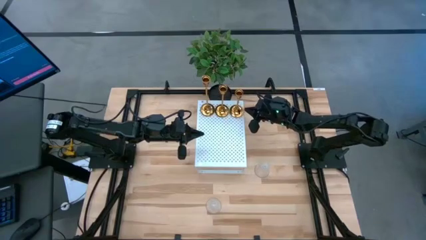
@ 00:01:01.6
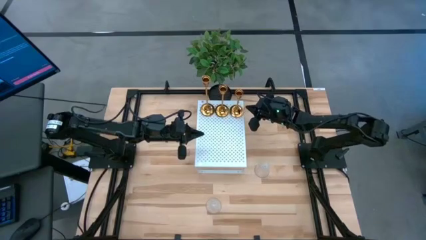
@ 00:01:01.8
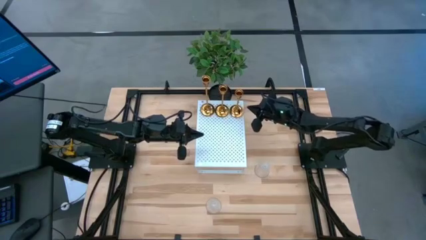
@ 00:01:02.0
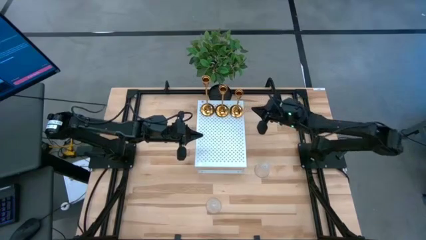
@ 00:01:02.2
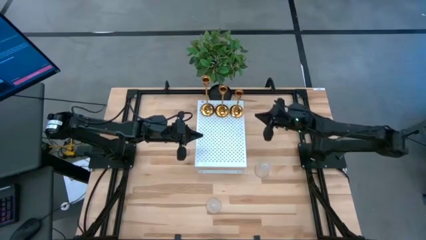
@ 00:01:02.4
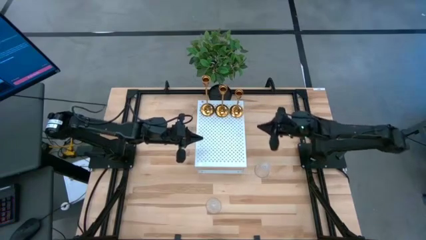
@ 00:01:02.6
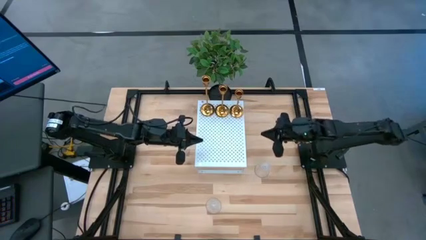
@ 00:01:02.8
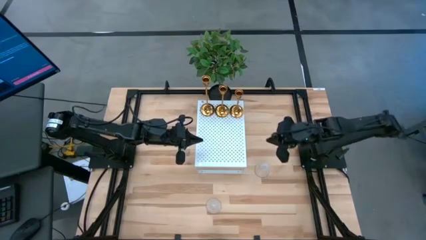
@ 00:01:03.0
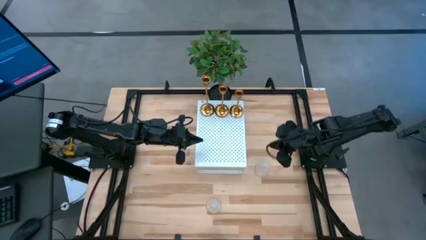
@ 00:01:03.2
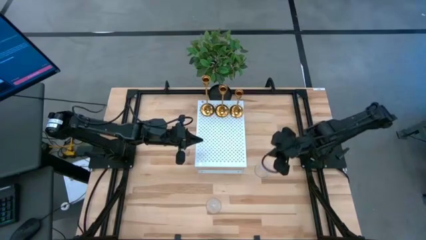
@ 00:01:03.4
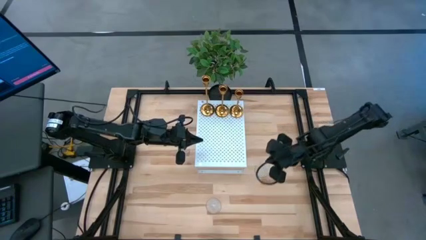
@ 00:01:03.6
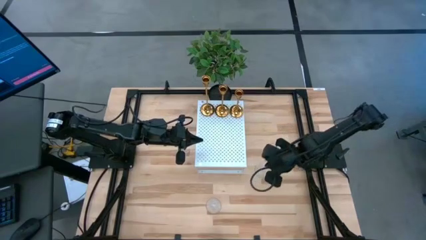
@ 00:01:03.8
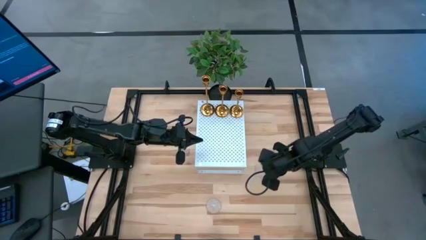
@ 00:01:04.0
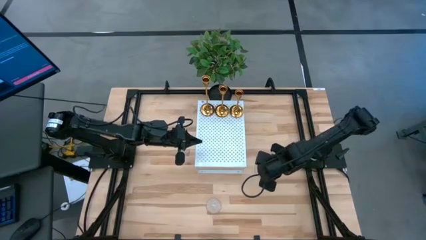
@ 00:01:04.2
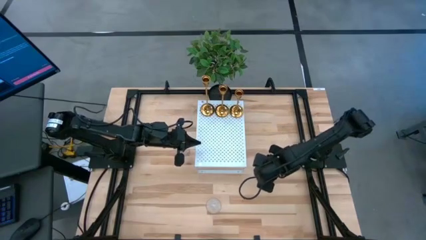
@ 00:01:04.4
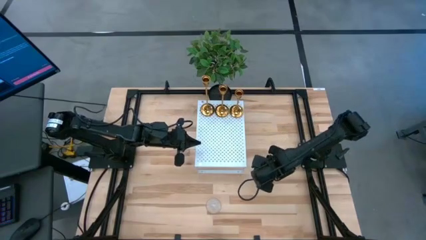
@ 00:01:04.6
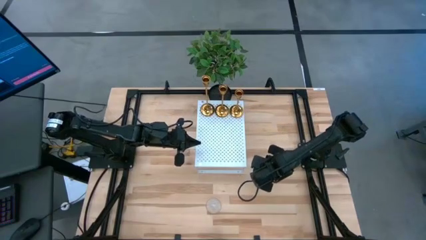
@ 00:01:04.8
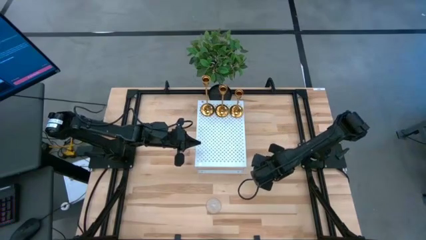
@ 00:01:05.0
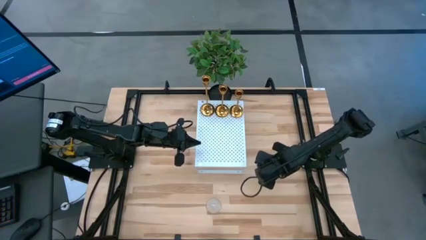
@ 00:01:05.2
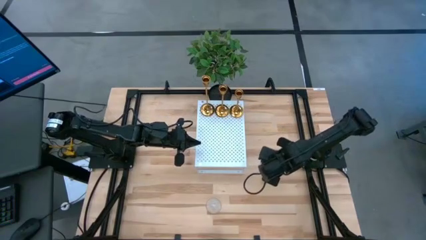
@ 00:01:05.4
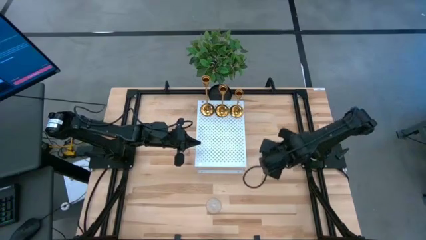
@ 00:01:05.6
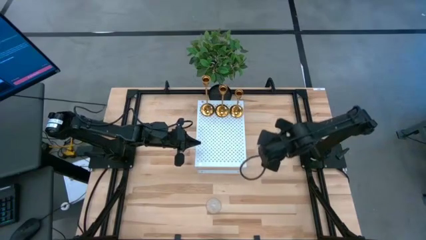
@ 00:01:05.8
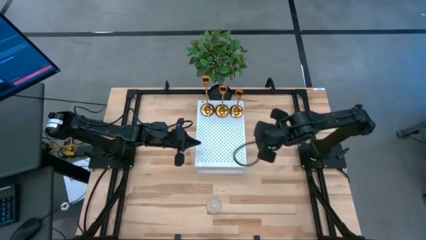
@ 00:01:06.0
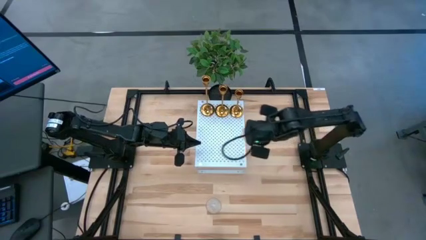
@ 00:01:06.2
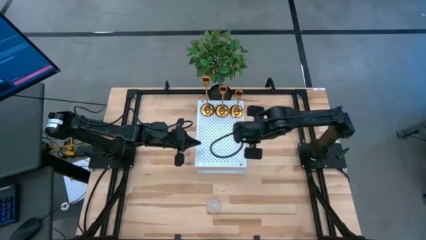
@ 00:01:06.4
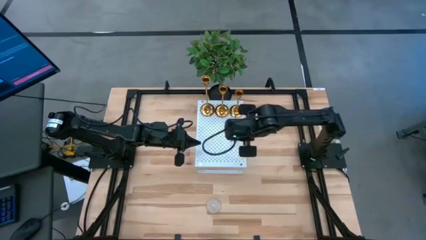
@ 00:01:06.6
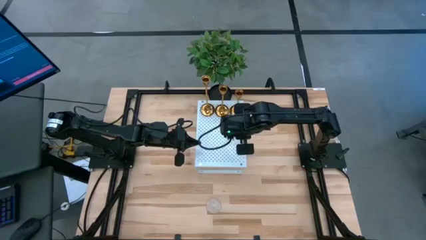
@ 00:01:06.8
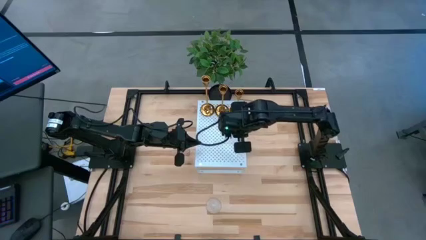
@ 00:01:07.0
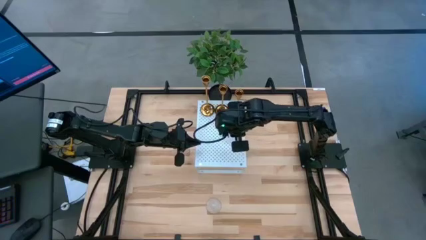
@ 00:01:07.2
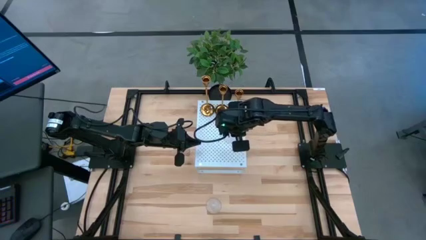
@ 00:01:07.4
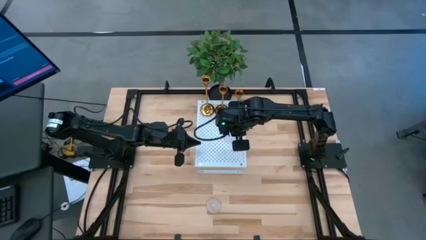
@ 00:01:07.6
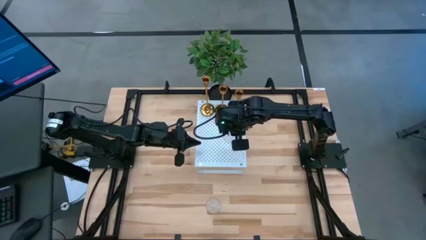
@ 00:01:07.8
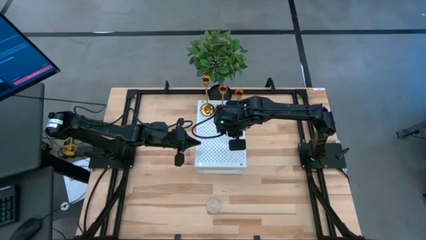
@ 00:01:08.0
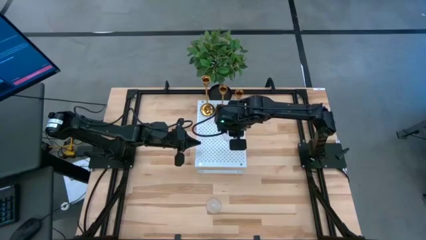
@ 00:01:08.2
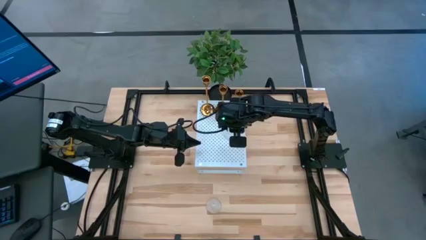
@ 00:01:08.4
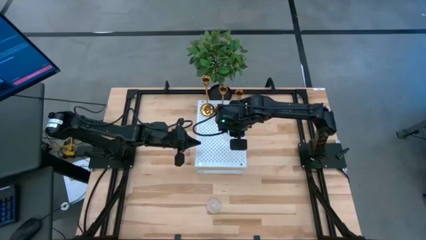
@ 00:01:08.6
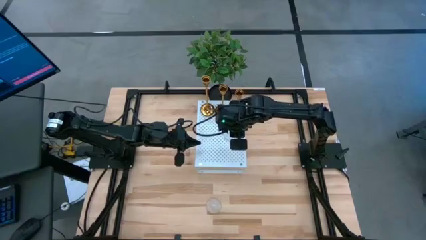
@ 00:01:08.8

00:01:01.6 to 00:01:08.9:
Task: Pick & Place candle stick holders
Put the top transparent glass candle holder on the shelf

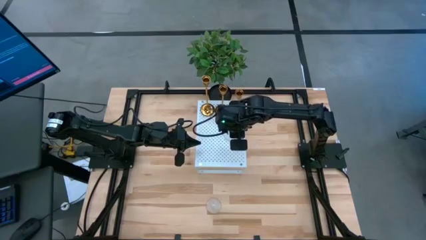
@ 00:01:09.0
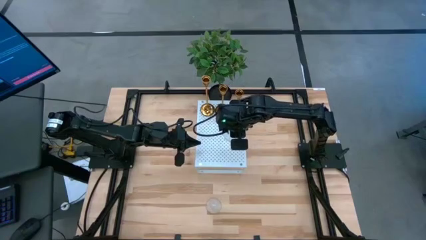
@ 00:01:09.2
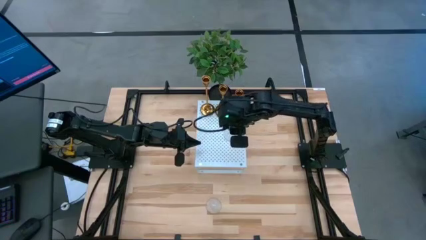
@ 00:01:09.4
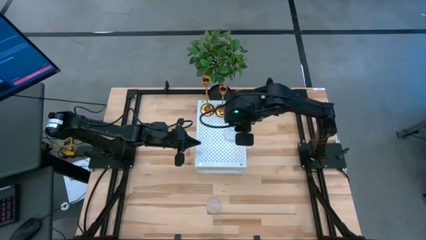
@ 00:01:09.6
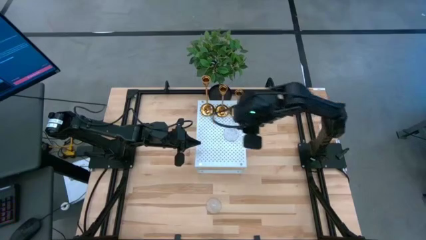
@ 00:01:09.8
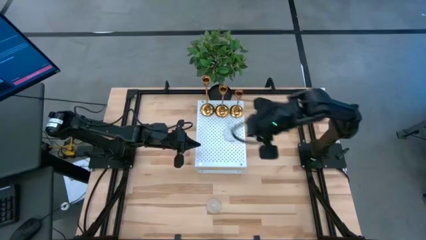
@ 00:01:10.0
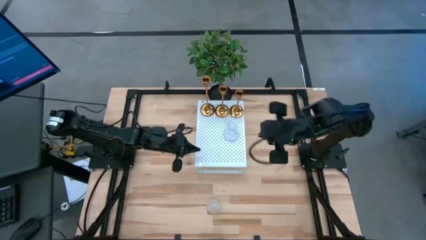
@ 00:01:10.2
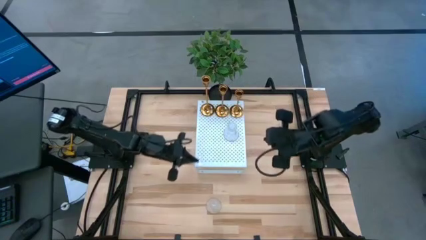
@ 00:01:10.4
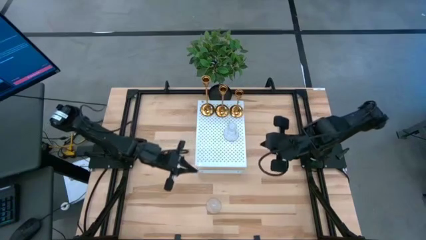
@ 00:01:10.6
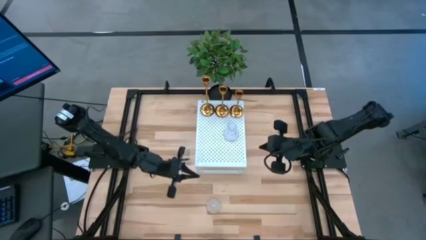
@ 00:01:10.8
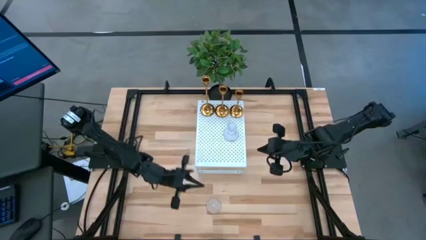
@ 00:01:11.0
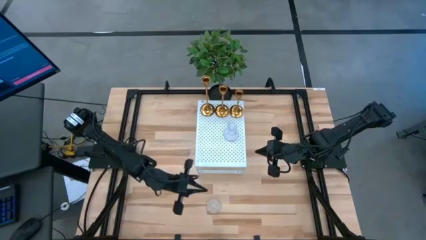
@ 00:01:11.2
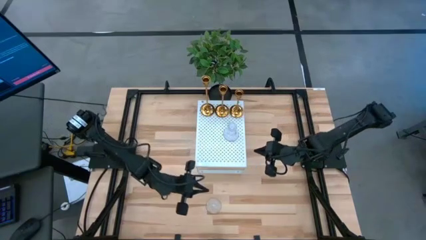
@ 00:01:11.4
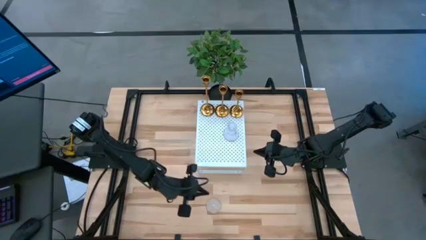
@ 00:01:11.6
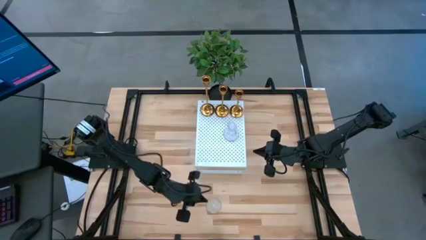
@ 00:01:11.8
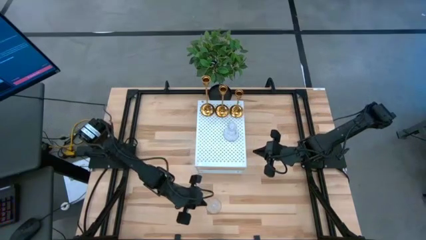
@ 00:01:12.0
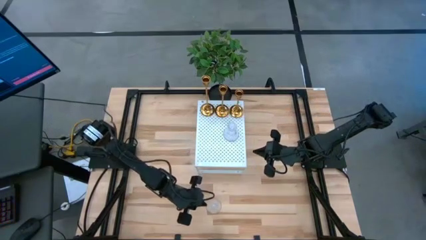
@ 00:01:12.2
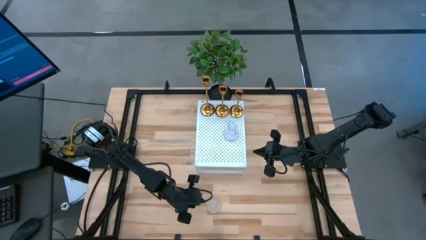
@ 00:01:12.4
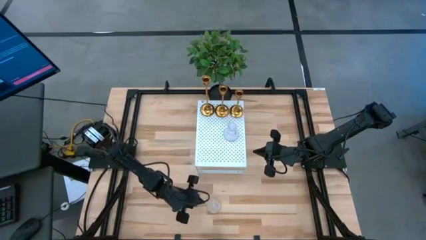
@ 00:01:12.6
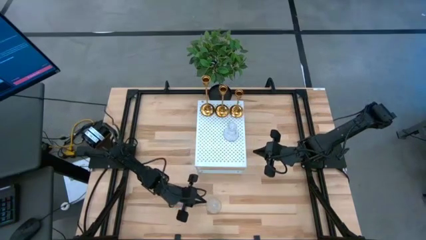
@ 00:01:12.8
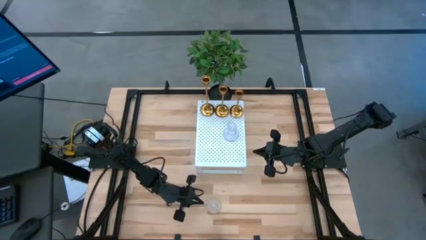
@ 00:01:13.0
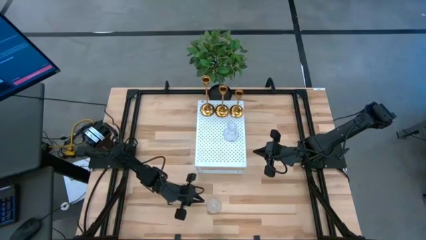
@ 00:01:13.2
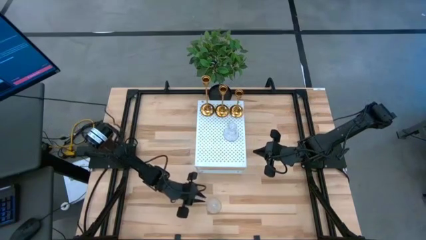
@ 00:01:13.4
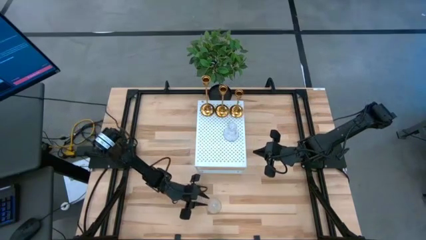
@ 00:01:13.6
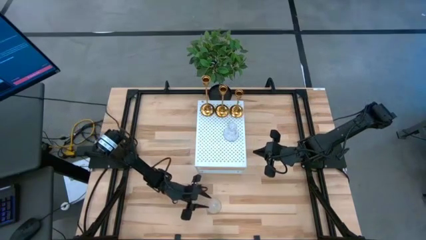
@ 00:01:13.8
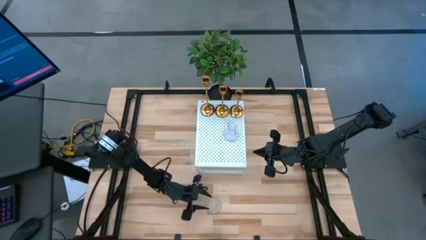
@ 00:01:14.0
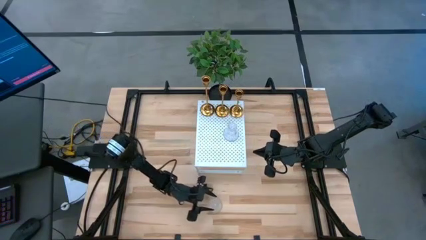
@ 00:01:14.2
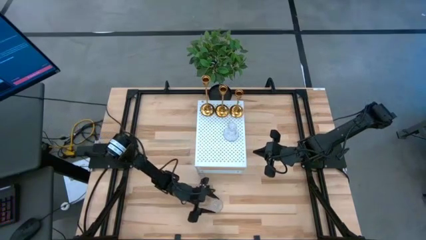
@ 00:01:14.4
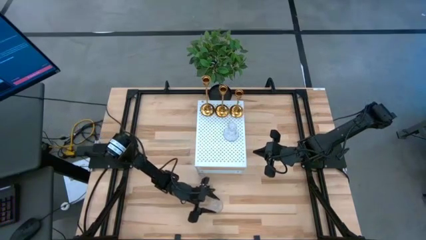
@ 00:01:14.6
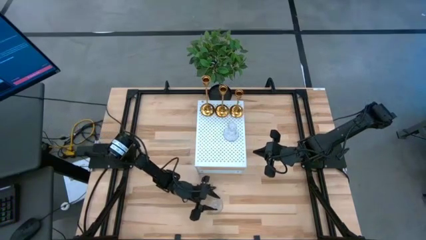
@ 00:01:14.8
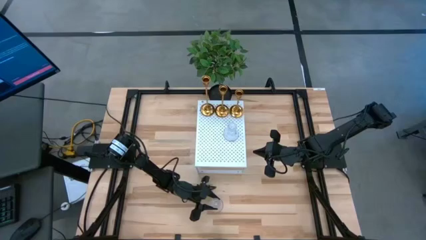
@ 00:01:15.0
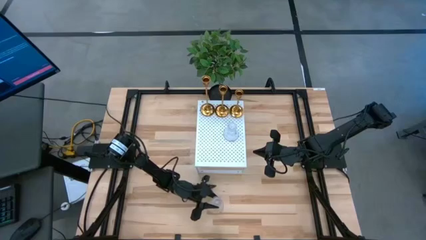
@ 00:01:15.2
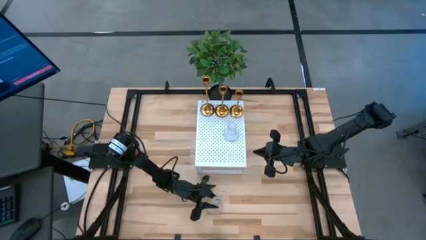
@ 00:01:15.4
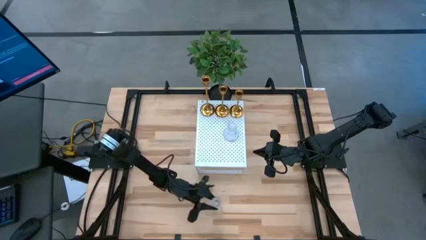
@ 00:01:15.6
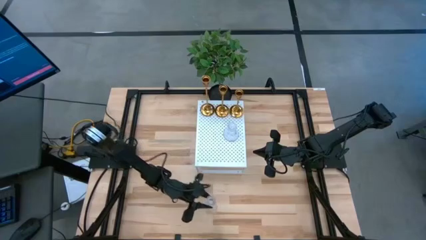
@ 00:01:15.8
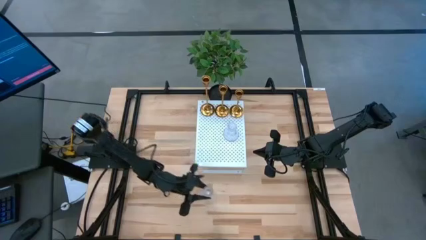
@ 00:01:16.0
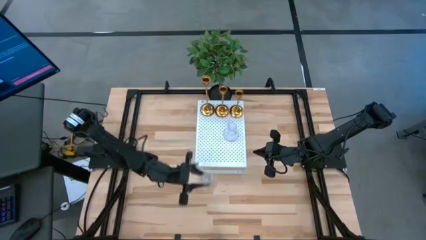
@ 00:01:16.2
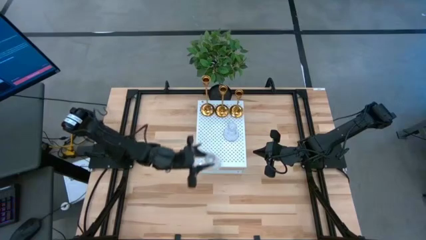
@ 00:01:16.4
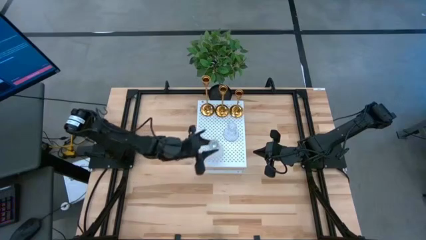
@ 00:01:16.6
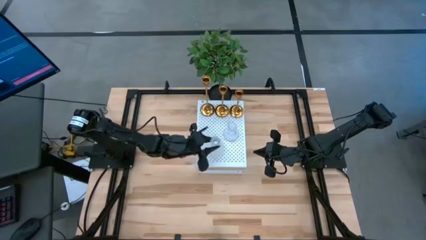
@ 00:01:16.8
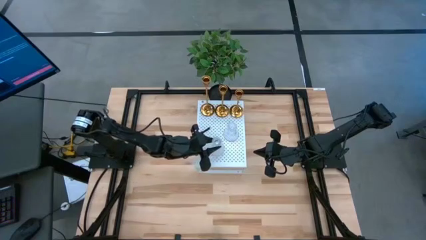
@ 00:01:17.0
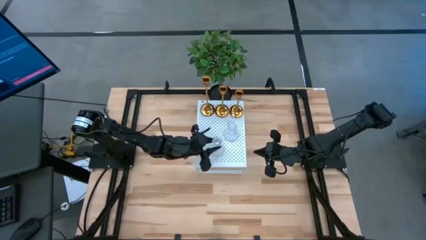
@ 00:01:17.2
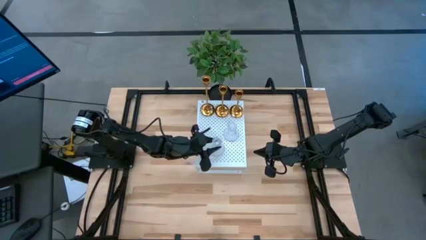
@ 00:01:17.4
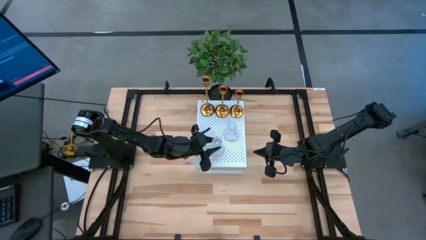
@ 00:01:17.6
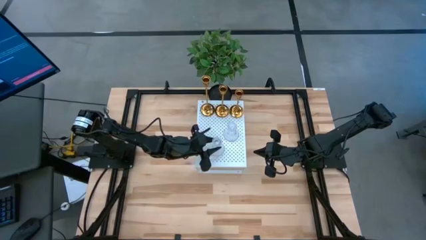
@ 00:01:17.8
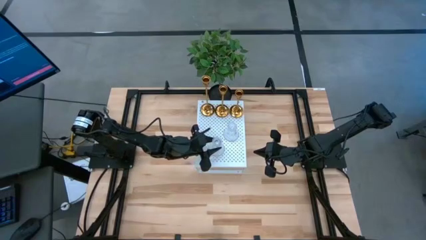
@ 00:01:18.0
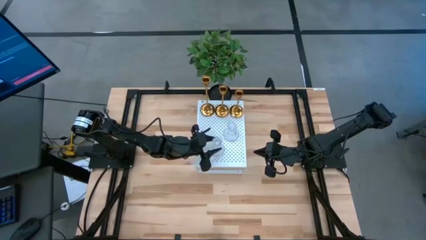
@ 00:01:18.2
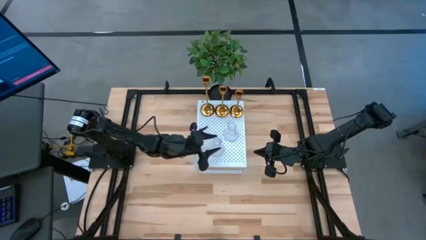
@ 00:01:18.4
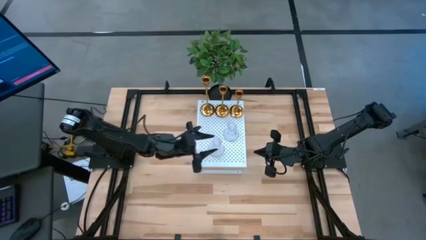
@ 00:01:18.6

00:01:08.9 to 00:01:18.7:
Put the transparent glass candle holder on the shelf
